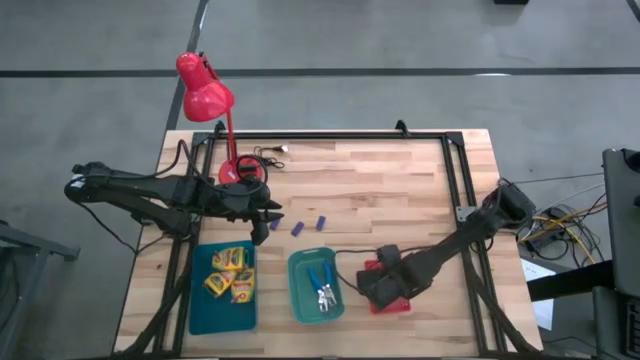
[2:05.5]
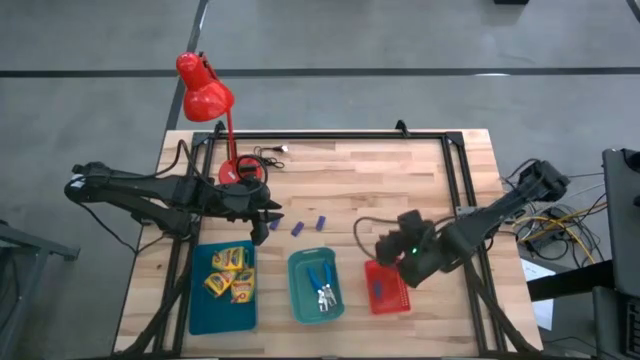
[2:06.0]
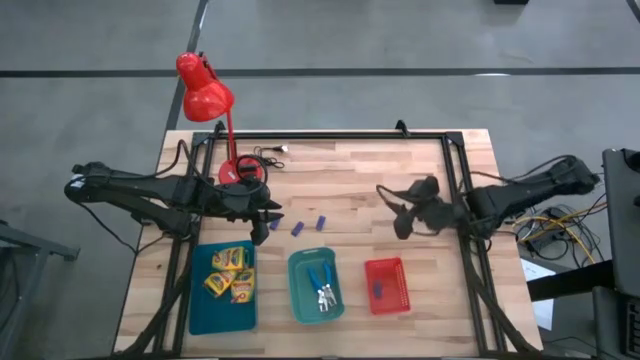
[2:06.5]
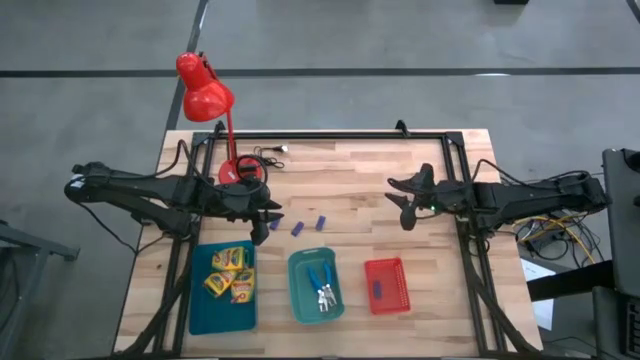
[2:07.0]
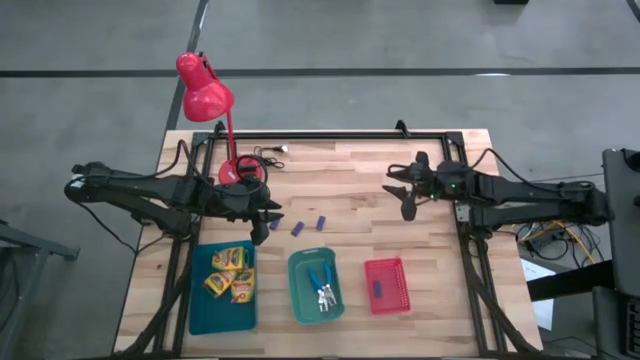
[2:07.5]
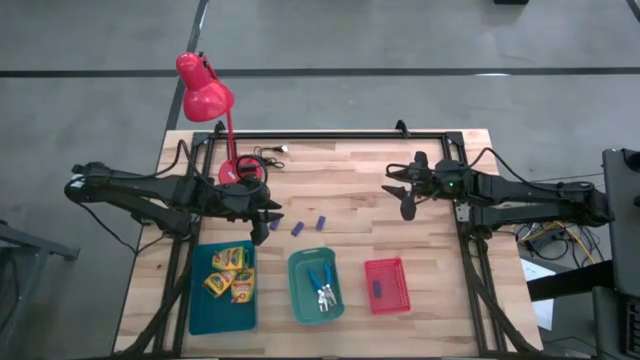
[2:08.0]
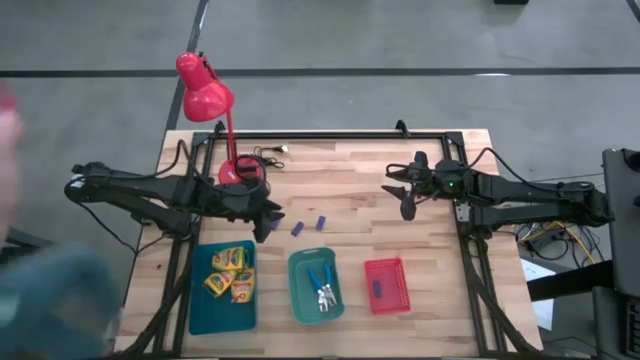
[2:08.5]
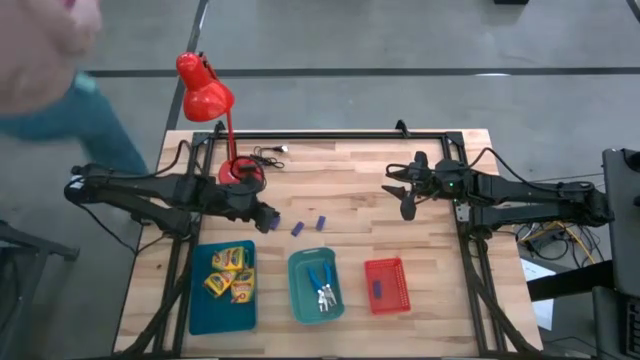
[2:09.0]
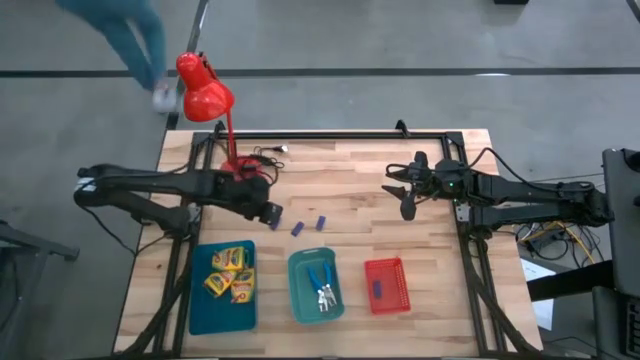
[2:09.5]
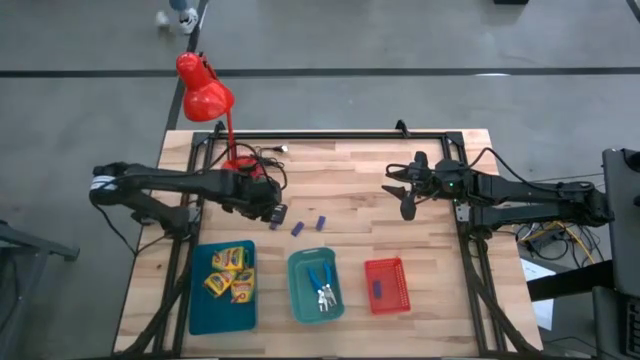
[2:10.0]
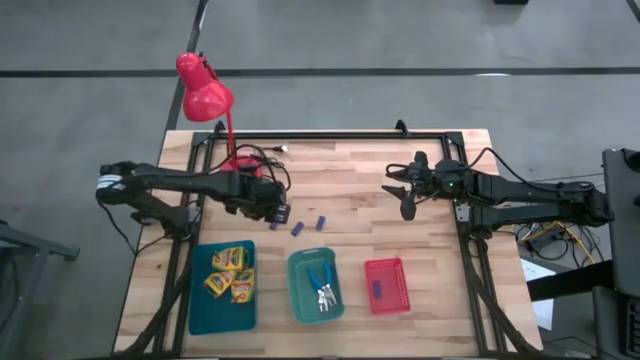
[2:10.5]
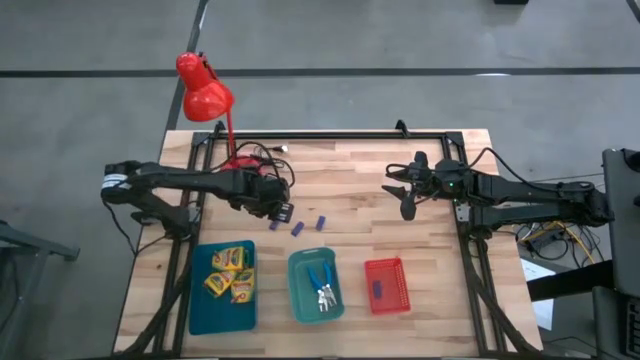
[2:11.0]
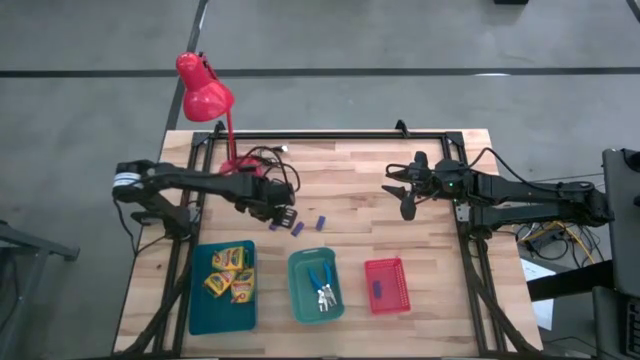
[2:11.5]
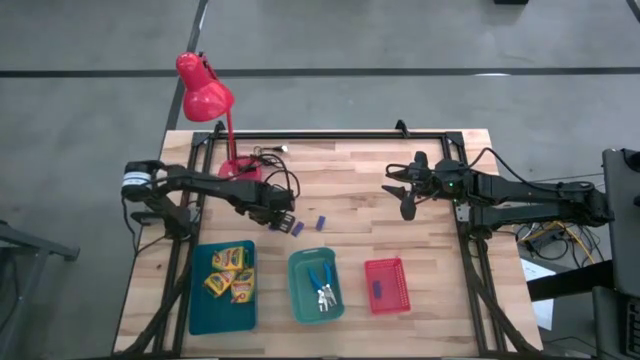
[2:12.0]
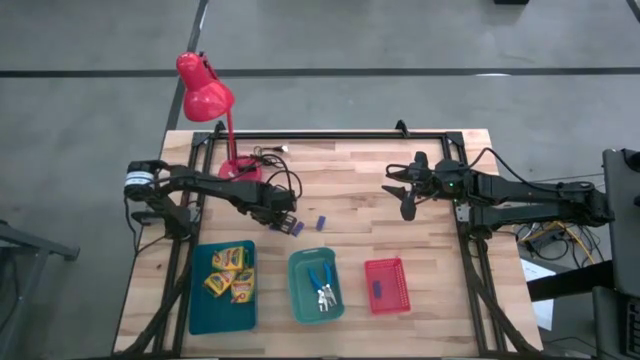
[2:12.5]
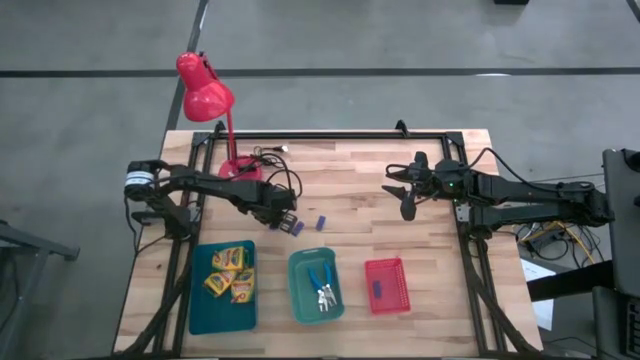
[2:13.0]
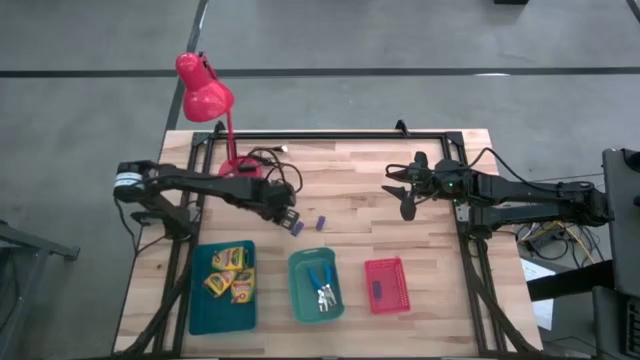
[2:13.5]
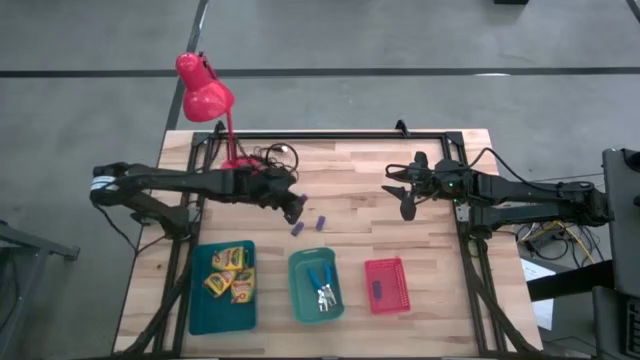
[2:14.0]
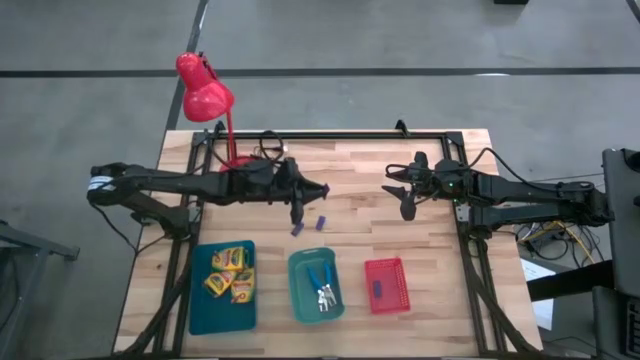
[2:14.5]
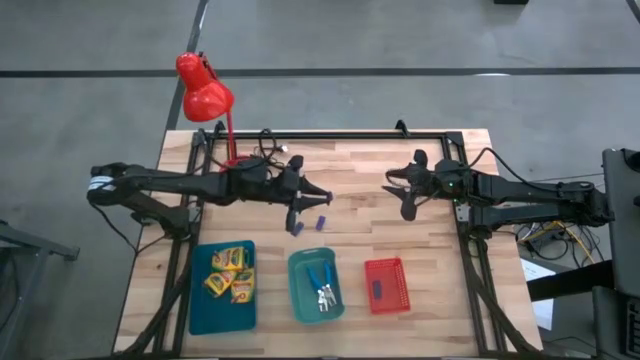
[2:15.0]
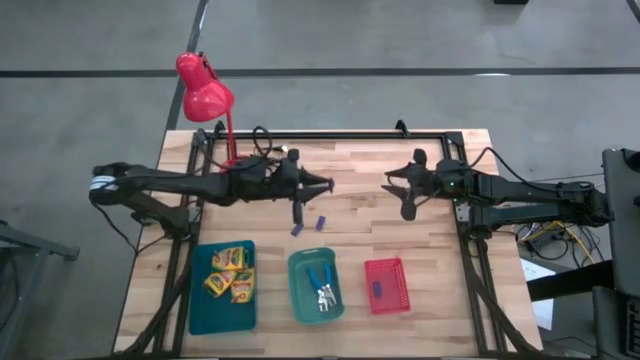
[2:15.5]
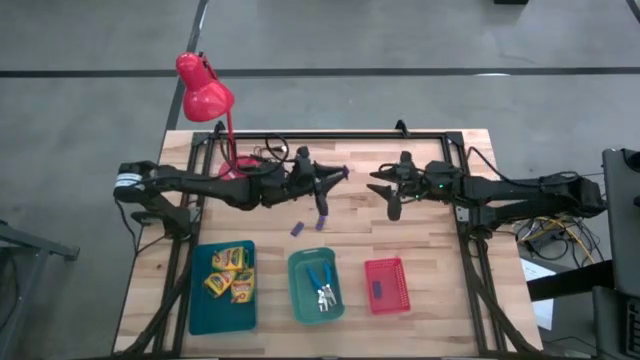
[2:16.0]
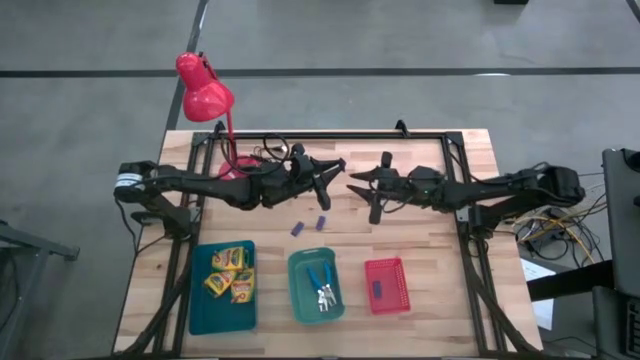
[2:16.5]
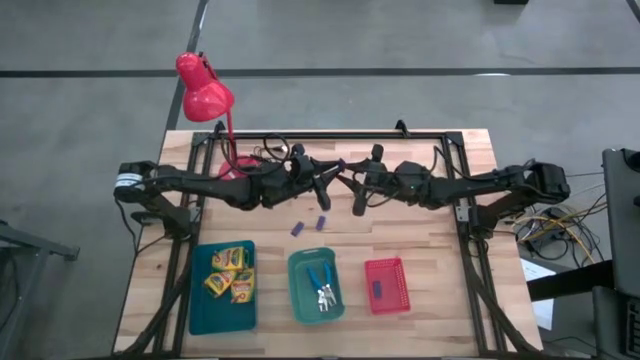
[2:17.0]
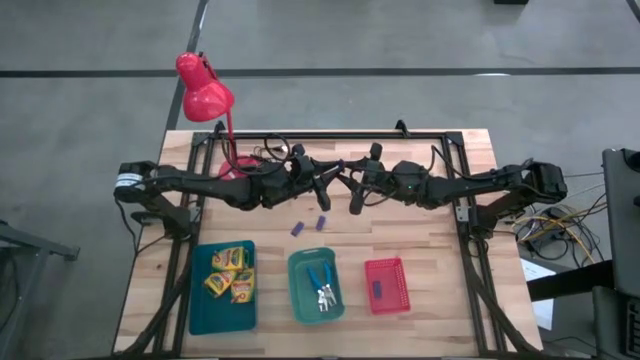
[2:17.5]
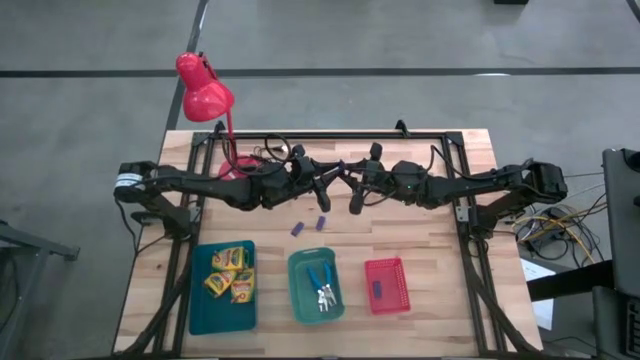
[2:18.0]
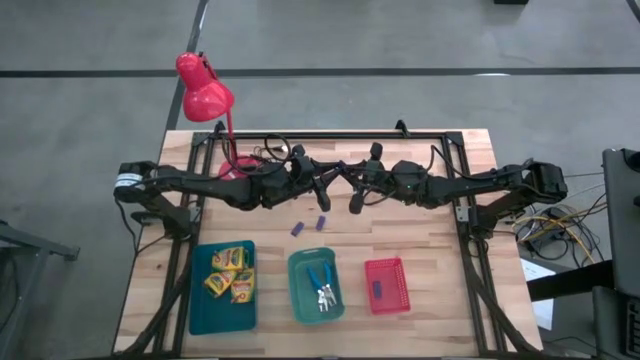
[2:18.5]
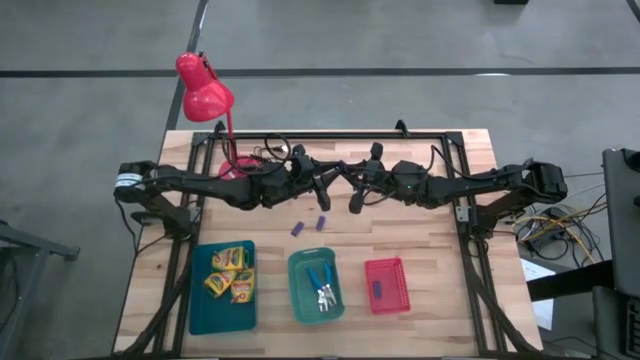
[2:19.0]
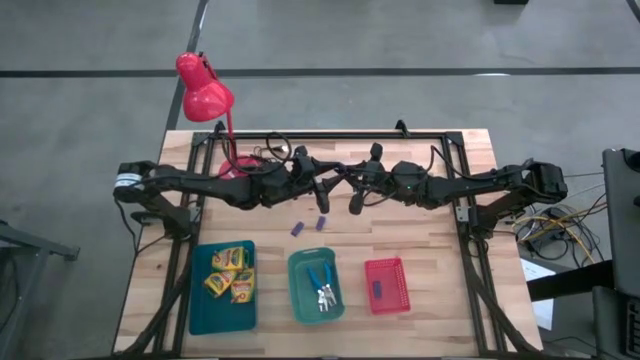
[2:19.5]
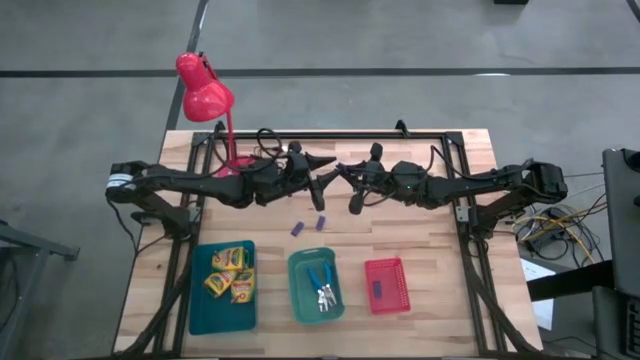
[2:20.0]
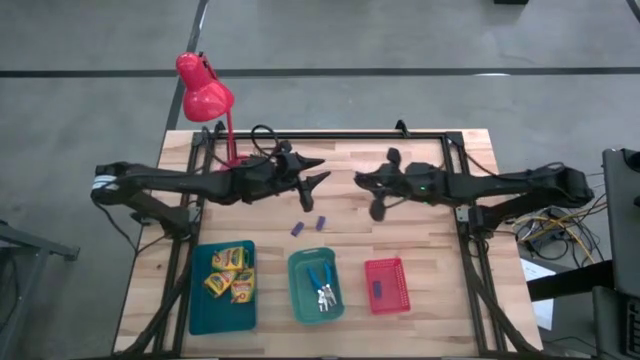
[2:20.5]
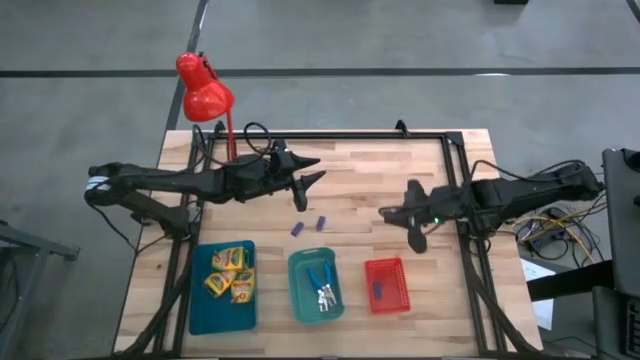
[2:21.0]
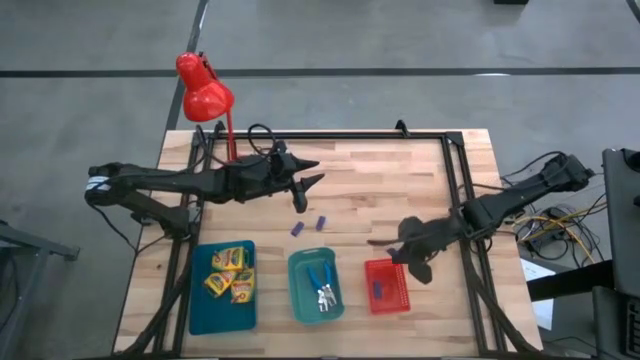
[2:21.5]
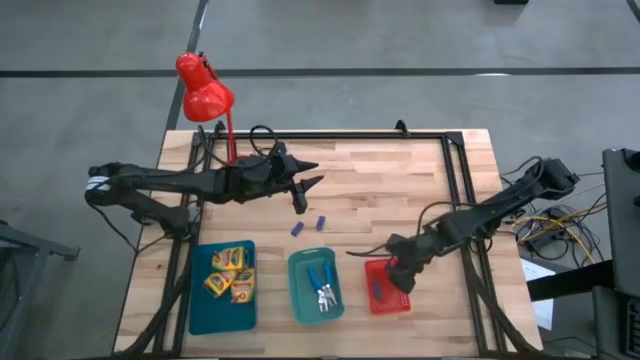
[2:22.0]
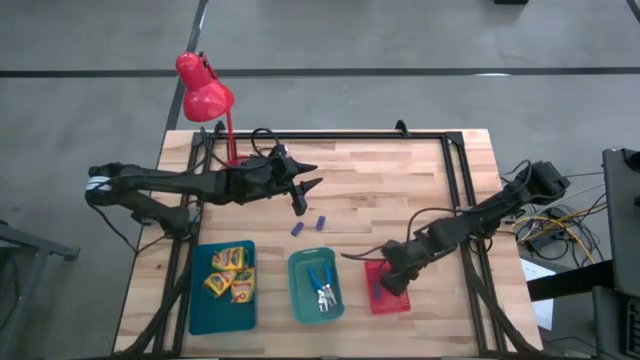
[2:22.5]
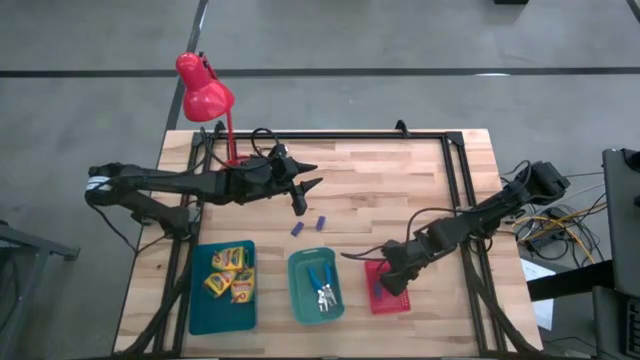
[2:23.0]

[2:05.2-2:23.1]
Task: Pick & Place School Supplies
Put the purple eraser into the red bin

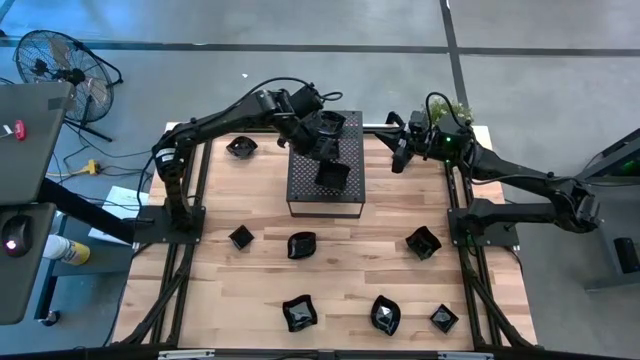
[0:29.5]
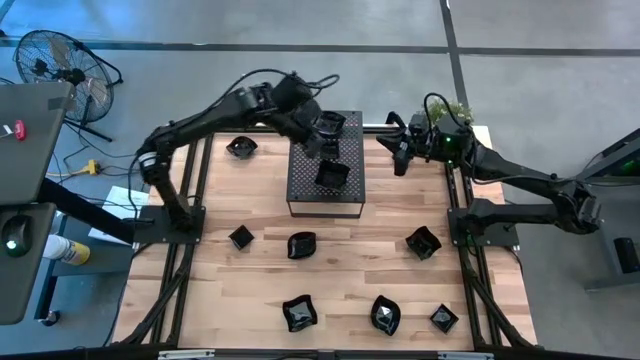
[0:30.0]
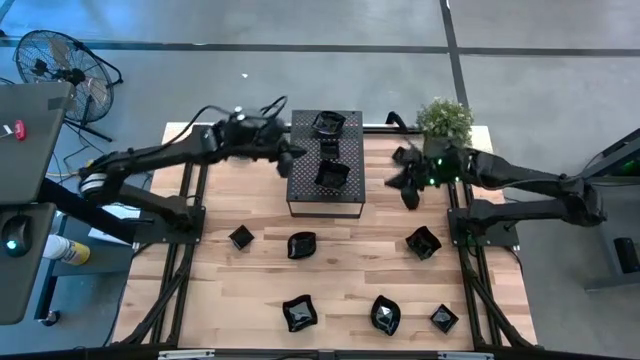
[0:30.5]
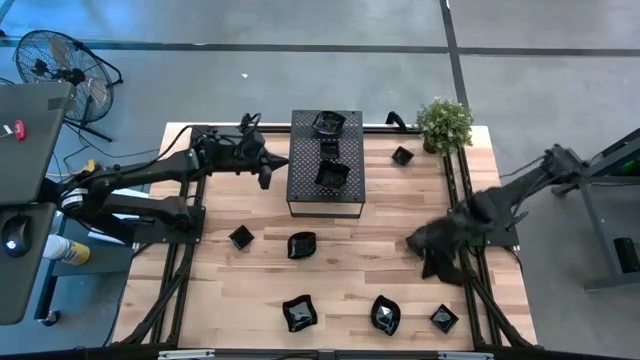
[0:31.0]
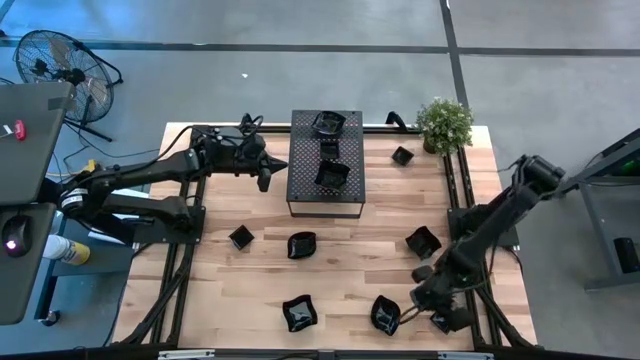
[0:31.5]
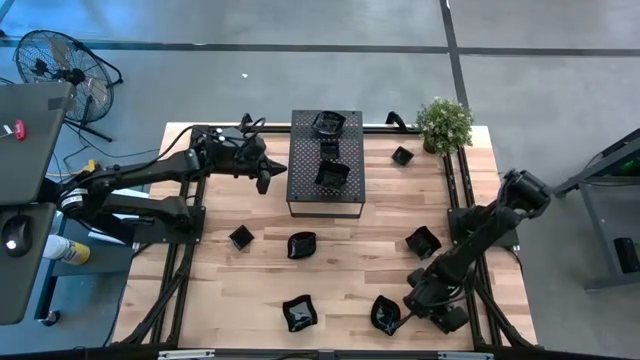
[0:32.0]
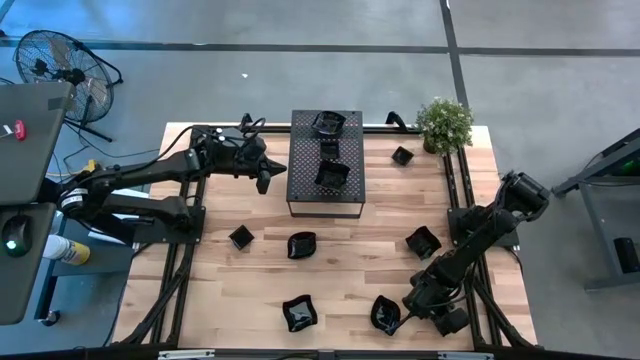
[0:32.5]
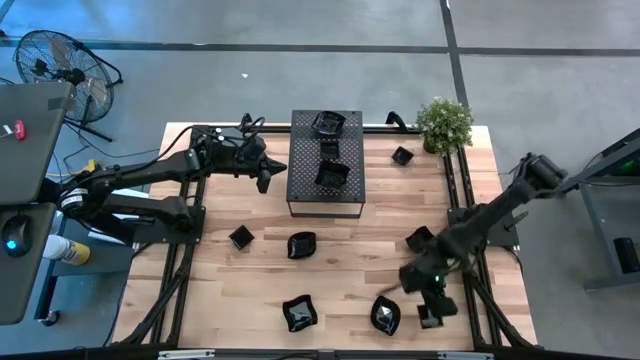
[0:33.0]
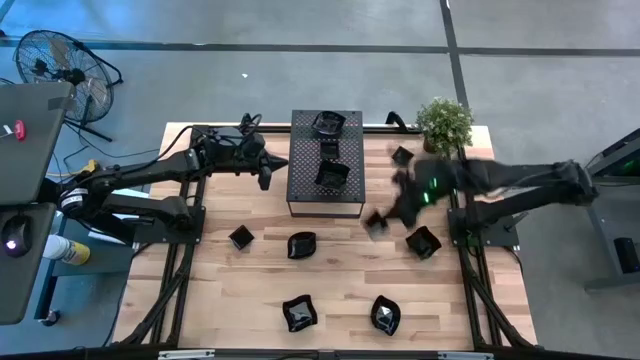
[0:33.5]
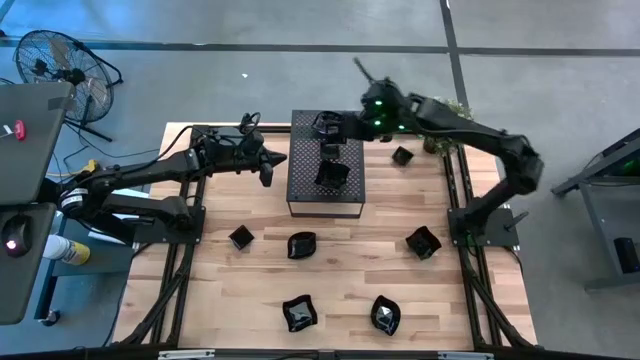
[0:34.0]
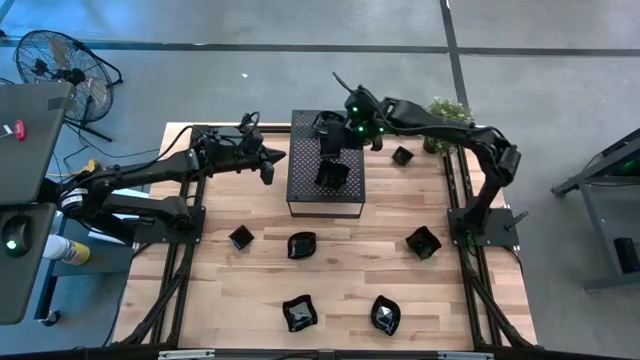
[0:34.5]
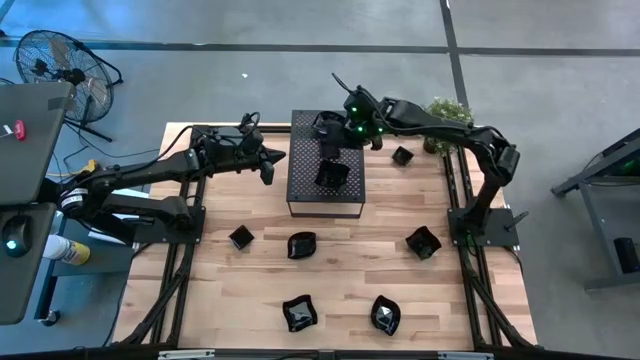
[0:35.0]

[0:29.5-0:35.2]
Task: Pick & Place Mini shaped plates
Stack the square plate on top of the square plate on the shelf
